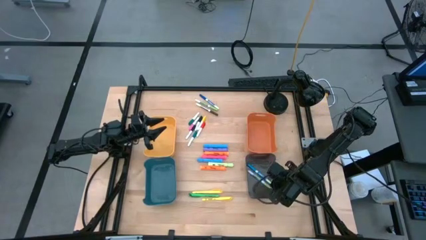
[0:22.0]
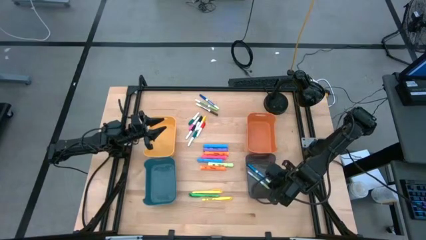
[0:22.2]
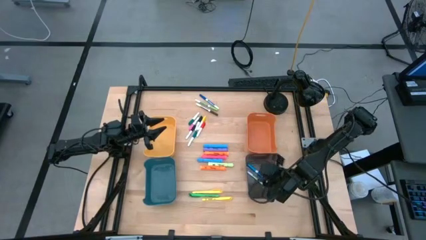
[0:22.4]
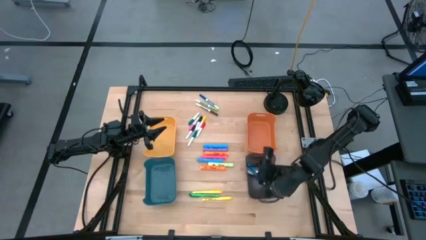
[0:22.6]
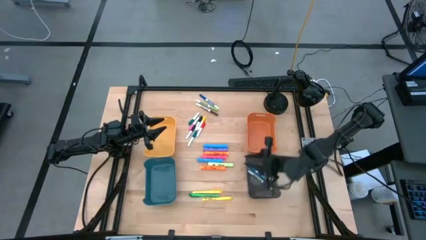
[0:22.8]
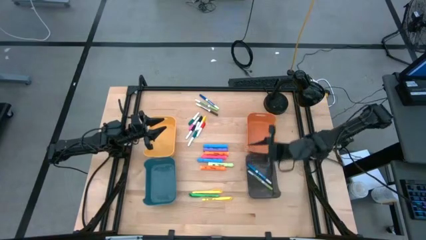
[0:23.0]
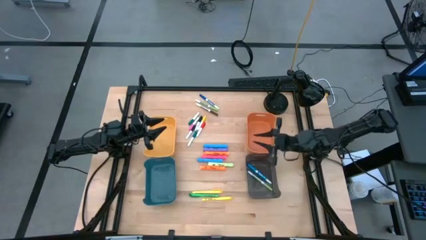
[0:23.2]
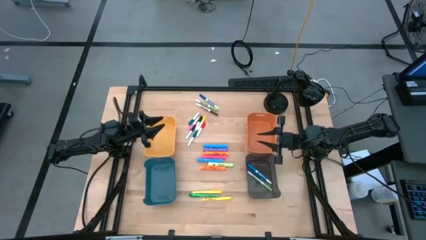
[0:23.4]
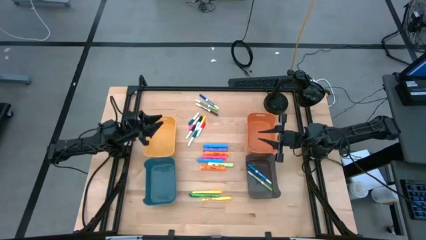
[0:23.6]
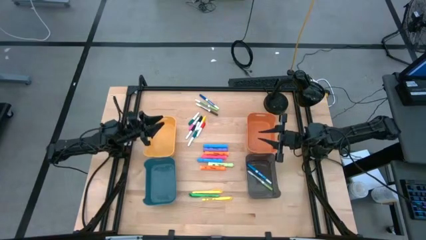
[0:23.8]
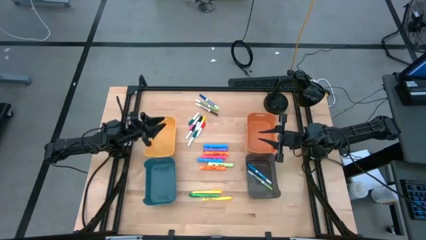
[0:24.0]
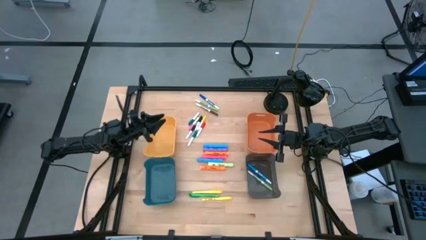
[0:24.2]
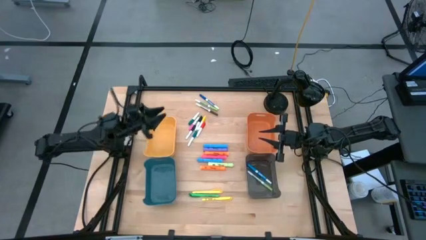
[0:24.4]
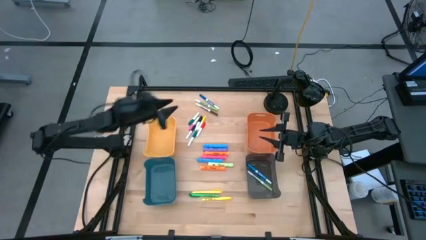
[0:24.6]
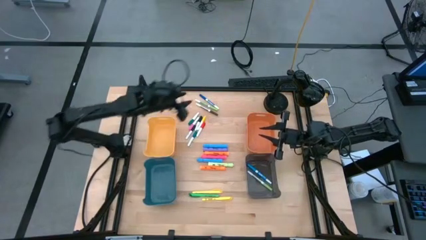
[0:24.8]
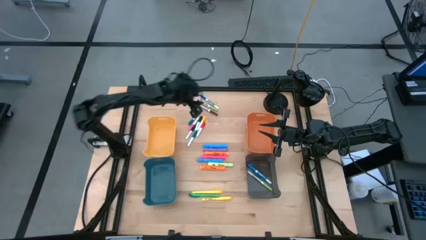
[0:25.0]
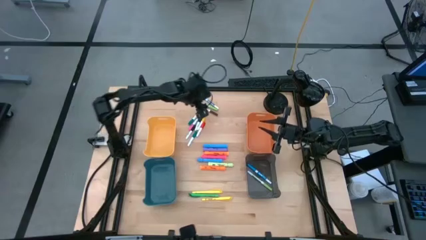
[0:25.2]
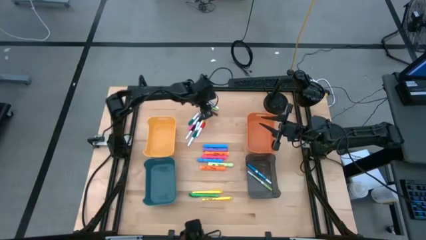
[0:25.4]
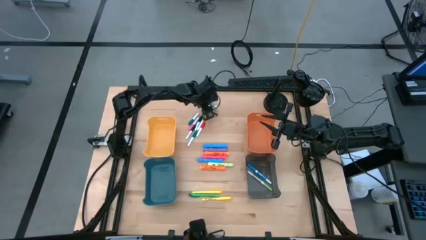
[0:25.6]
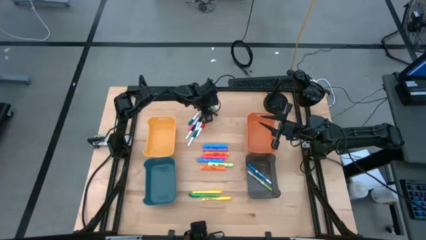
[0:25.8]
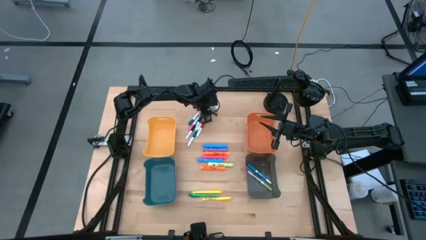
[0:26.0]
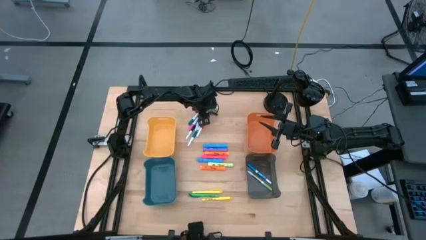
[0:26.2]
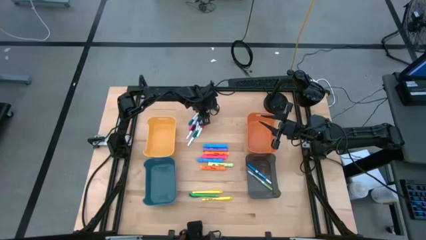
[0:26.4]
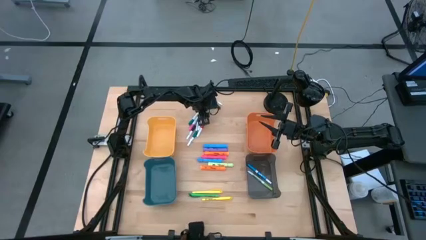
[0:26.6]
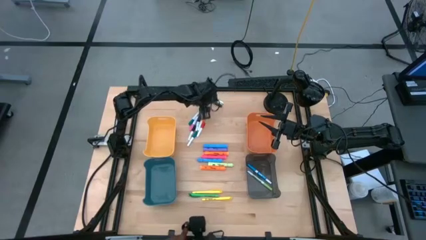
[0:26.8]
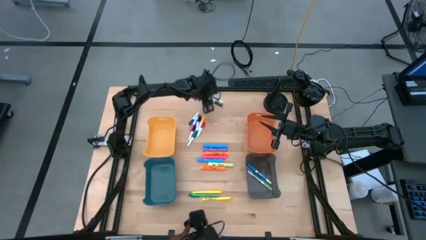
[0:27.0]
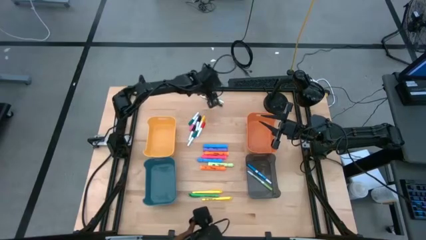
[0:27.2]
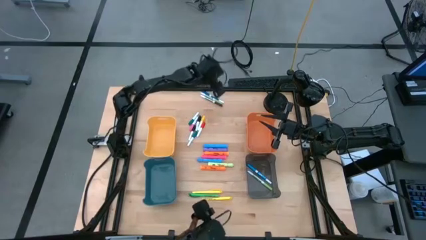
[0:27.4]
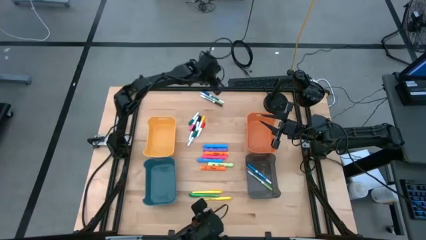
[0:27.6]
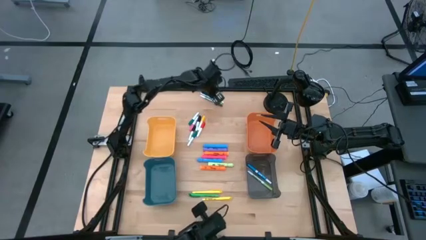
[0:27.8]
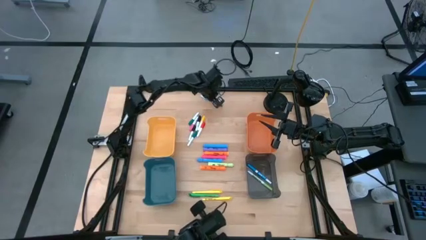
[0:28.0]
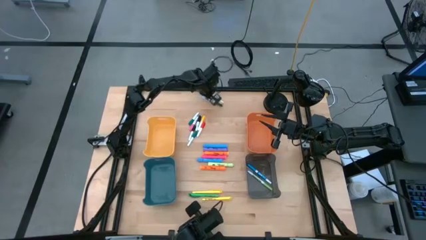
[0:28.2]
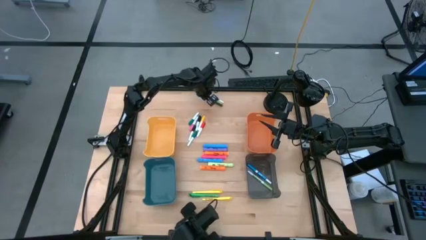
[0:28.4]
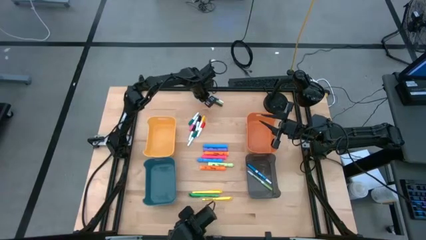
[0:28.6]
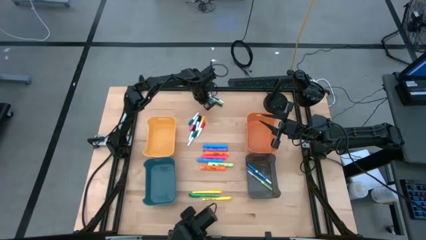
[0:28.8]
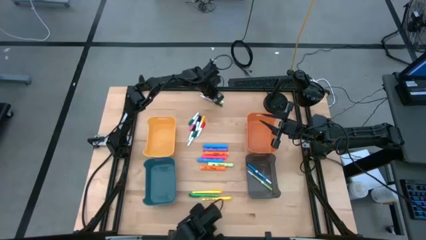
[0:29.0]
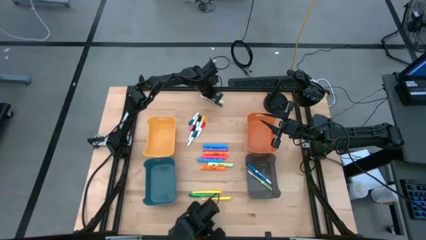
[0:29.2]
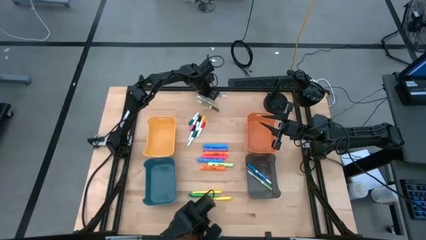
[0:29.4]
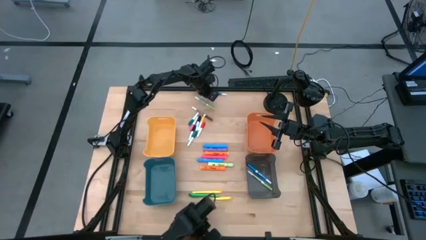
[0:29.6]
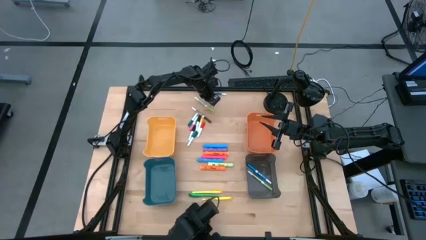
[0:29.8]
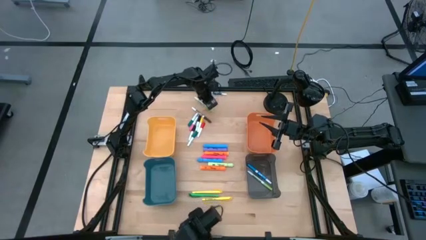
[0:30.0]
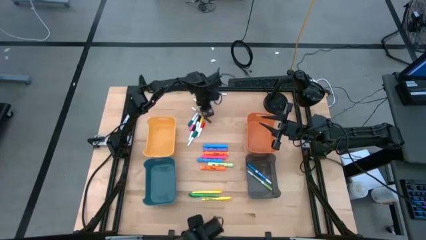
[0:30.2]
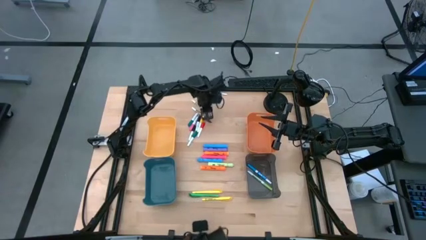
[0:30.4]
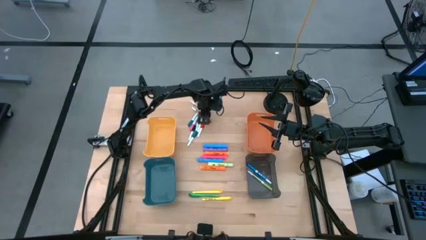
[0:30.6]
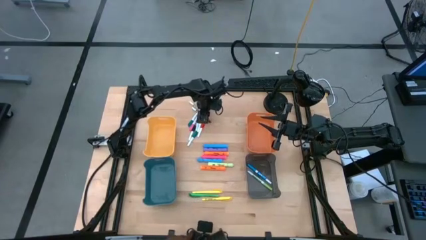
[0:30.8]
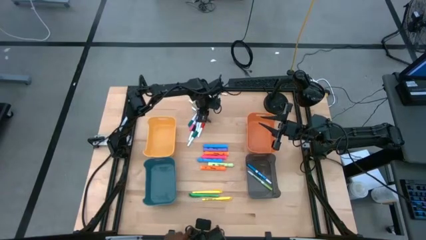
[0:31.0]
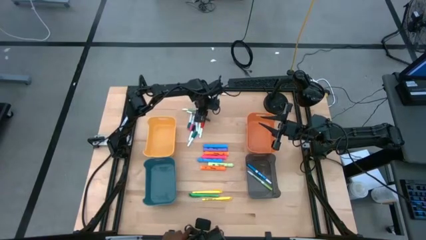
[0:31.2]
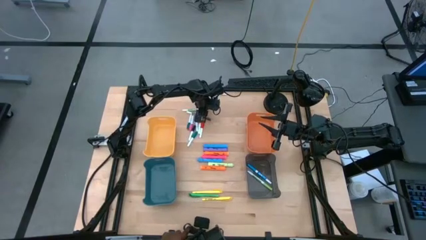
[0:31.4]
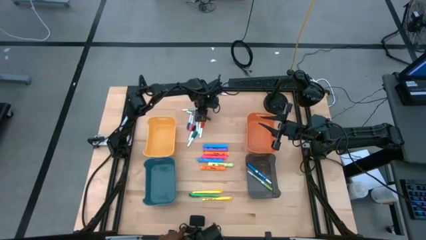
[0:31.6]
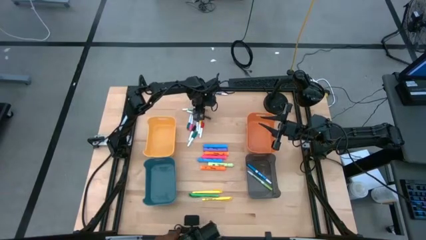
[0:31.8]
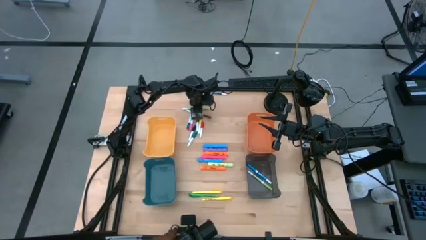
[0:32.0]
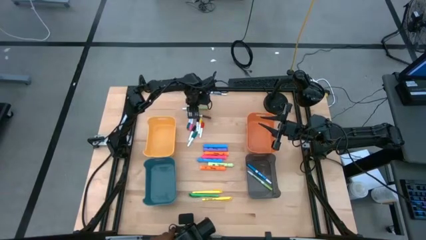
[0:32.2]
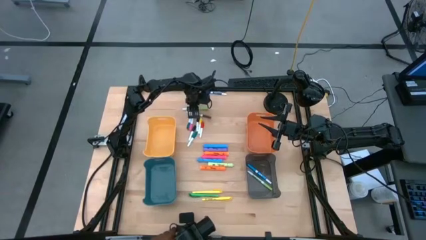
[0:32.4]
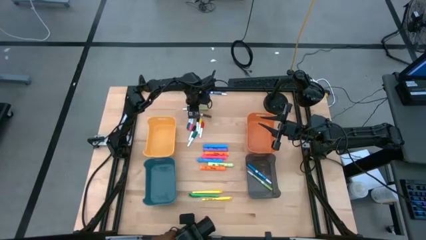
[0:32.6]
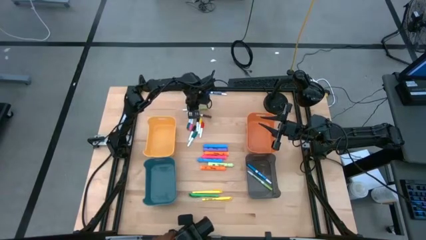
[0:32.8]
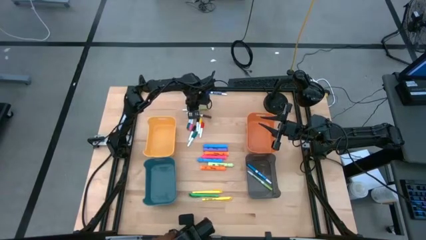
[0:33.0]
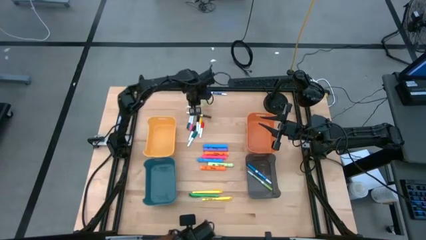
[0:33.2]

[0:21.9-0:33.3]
Task: Pick & Place Markers
Put the green dry erase marker into the black bin

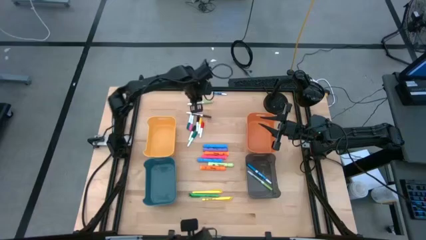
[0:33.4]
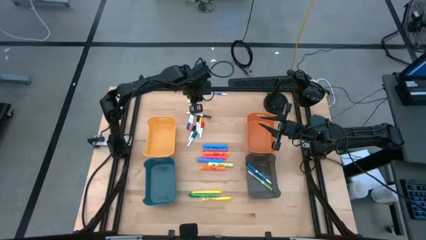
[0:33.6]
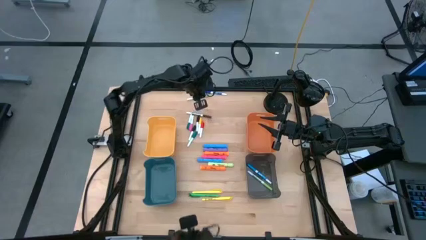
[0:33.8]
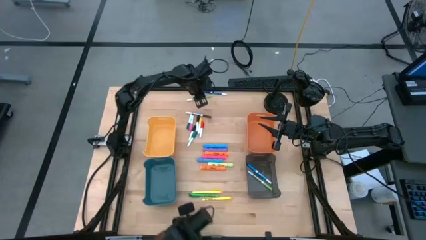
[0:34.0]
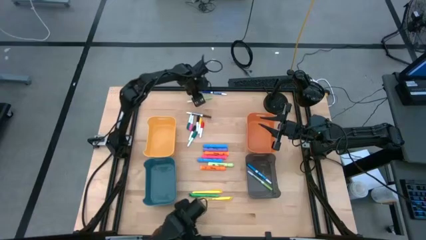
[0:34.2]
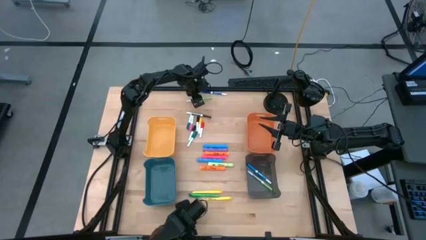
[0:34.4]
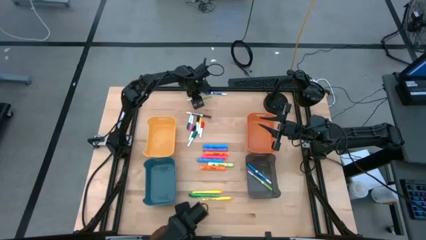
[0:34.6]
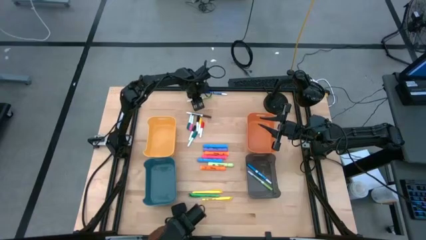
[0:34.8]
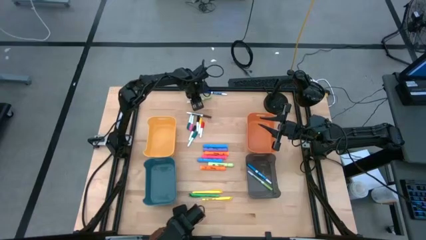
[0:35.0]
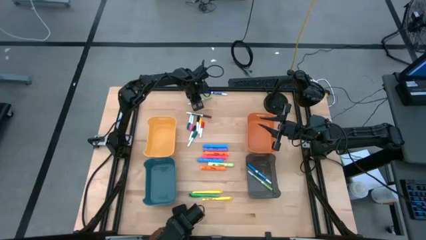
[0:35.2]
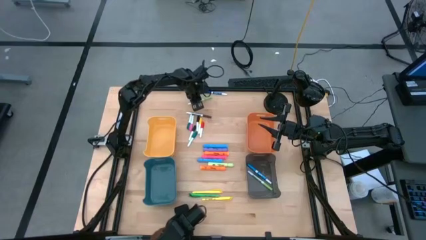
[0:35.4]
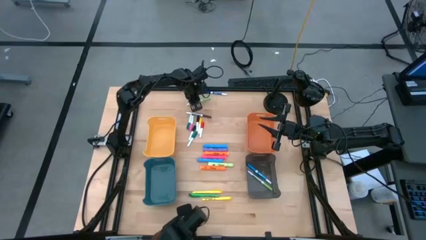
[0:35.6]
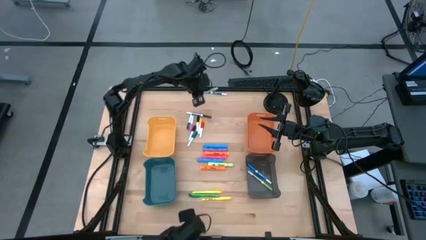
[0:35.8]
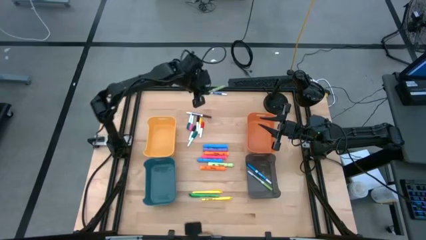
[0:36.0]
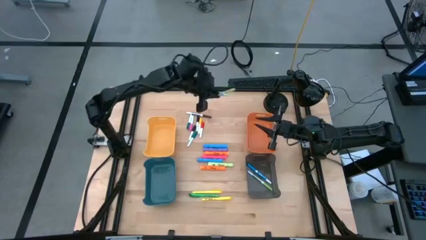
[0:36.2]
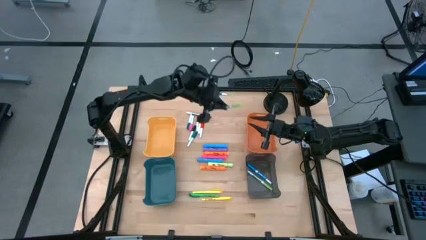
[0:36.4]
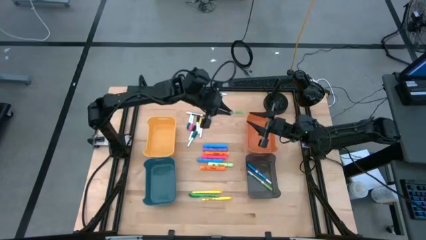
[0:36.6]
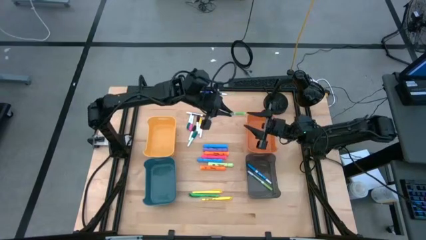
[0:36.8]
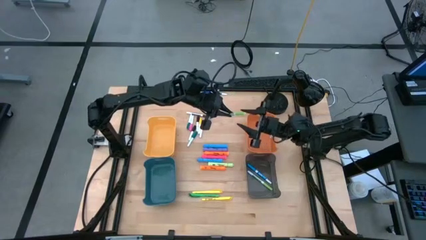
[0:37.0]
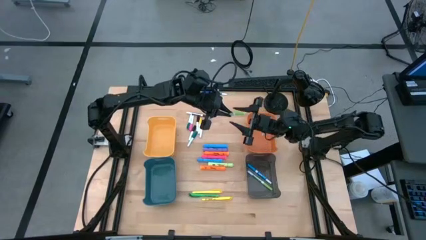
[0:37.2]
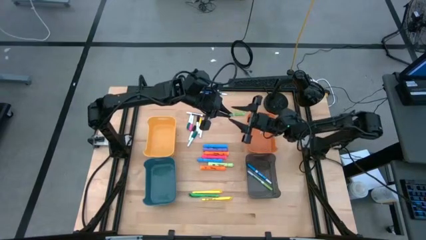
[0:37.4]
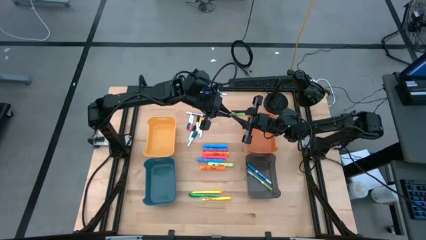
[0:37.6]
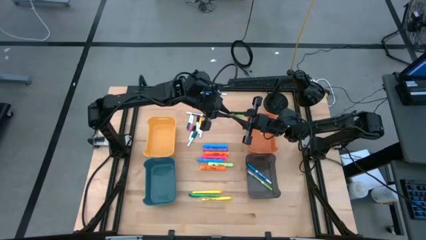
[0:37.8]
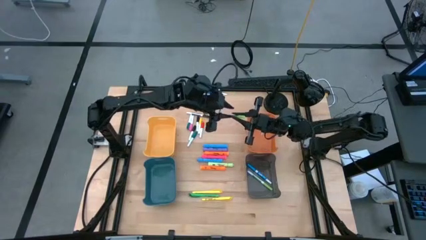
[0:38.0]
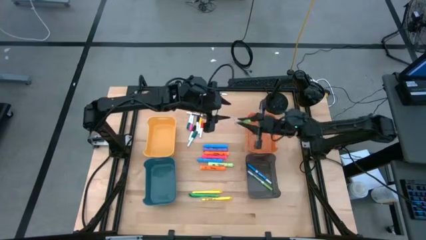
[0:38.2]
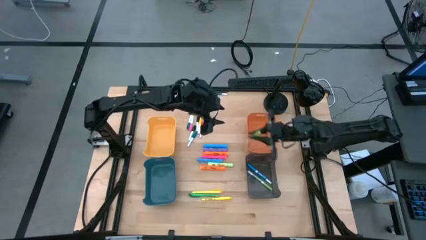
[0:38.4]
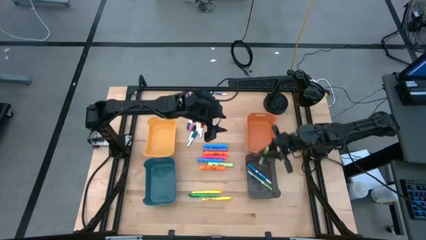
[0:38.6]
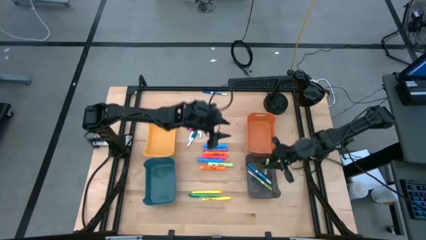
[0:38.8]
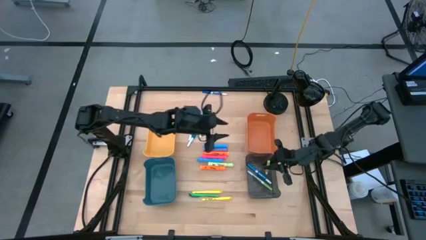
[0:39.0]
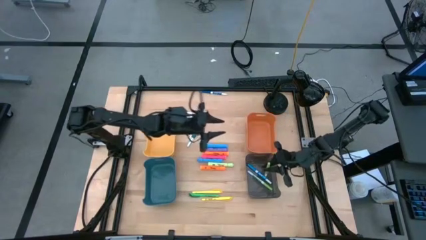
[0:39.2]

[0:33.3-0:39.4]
Put the green dry erase marker into the black bin
